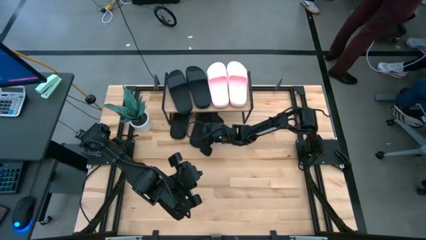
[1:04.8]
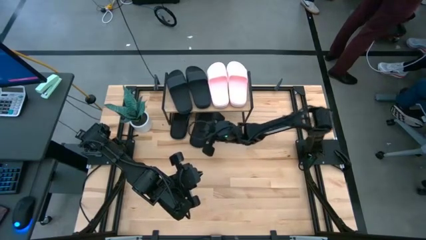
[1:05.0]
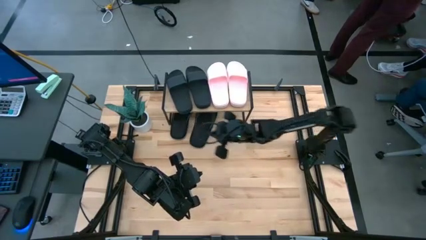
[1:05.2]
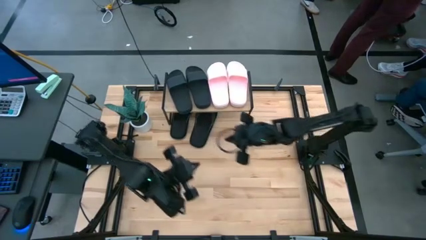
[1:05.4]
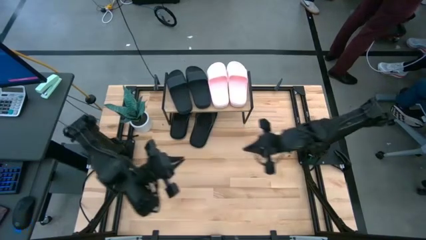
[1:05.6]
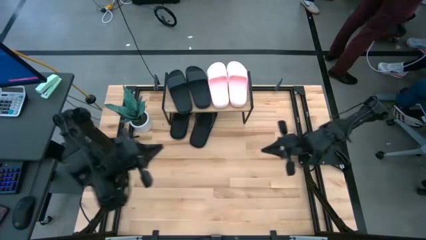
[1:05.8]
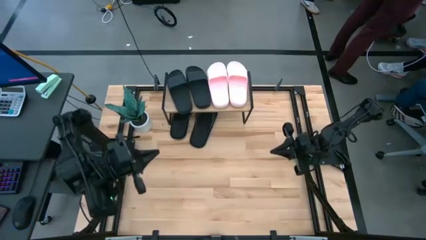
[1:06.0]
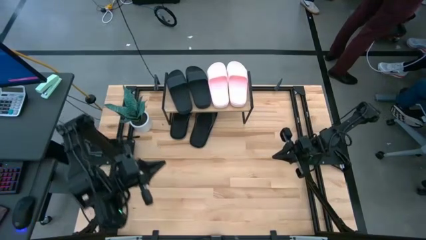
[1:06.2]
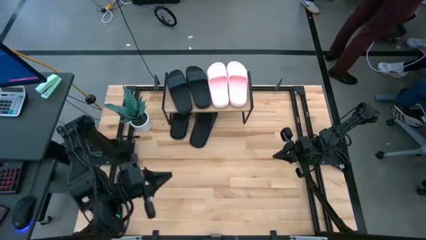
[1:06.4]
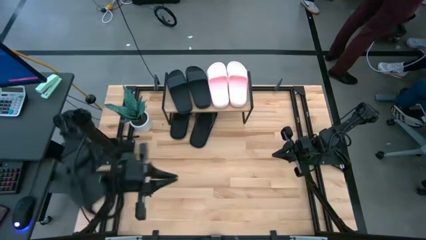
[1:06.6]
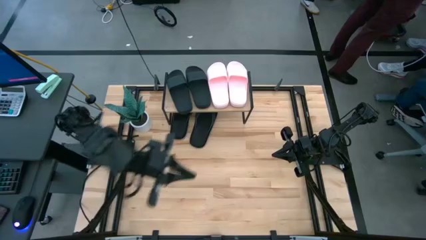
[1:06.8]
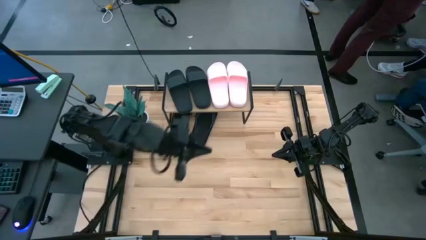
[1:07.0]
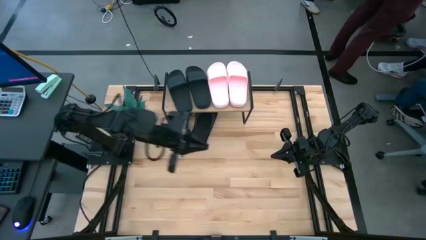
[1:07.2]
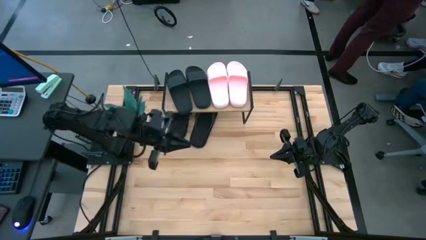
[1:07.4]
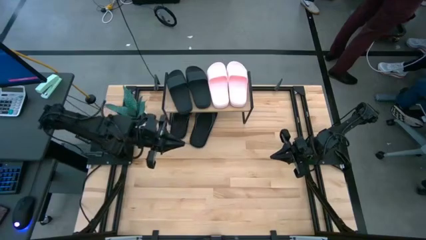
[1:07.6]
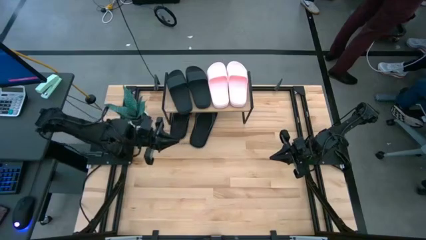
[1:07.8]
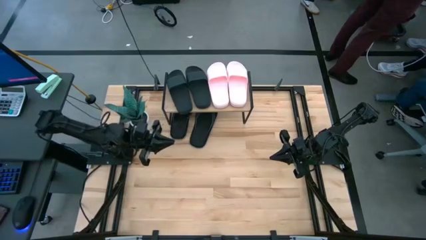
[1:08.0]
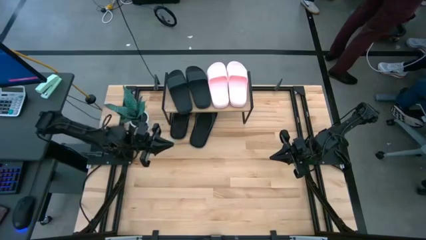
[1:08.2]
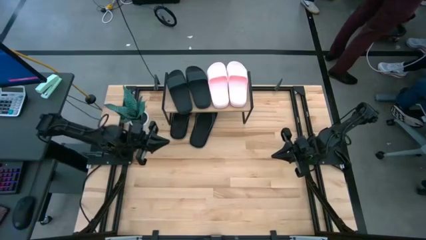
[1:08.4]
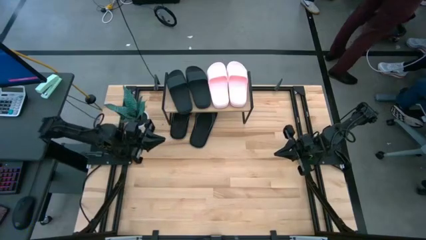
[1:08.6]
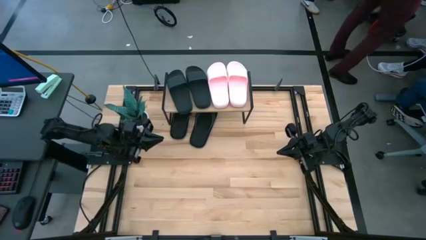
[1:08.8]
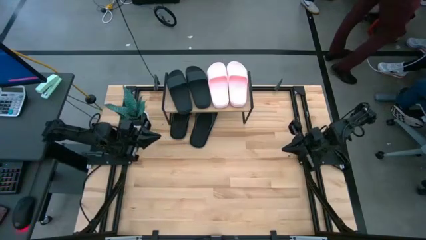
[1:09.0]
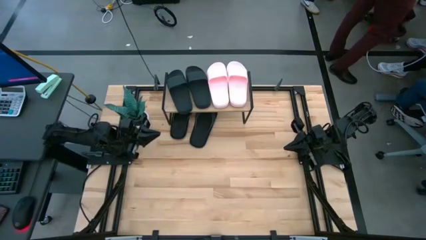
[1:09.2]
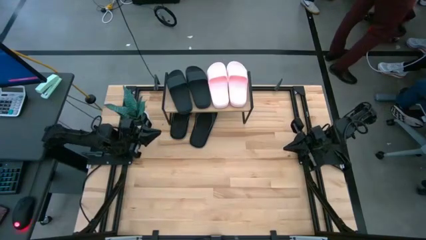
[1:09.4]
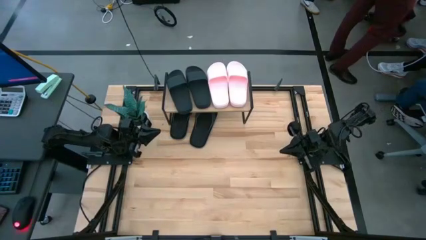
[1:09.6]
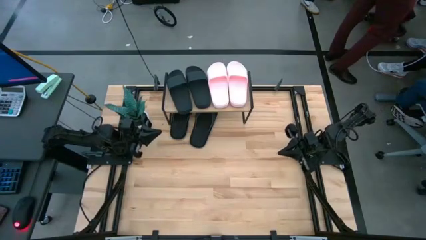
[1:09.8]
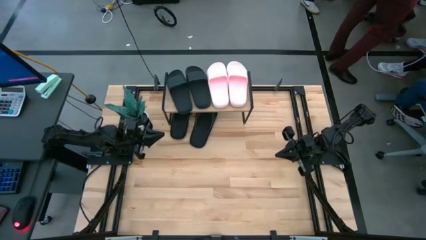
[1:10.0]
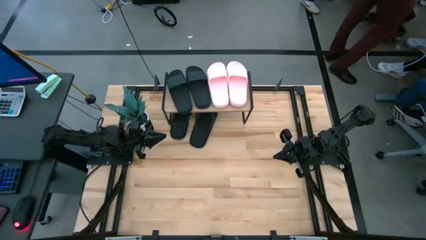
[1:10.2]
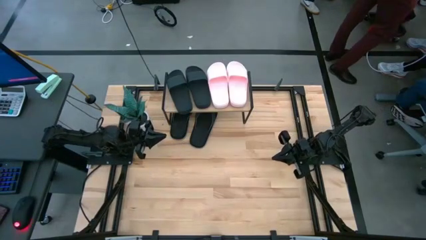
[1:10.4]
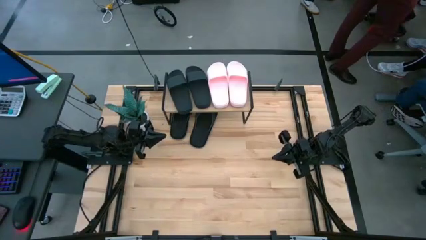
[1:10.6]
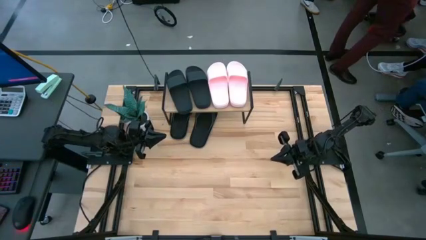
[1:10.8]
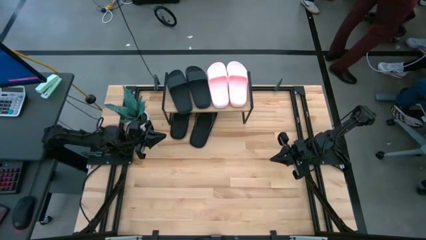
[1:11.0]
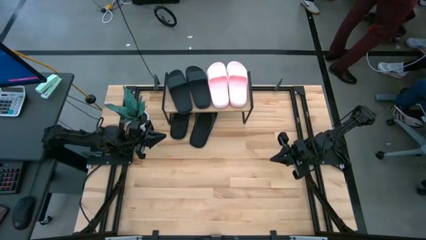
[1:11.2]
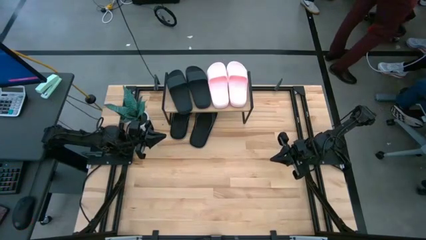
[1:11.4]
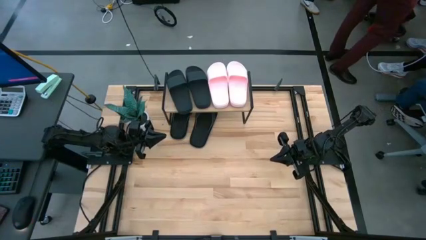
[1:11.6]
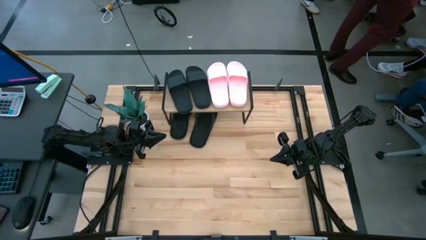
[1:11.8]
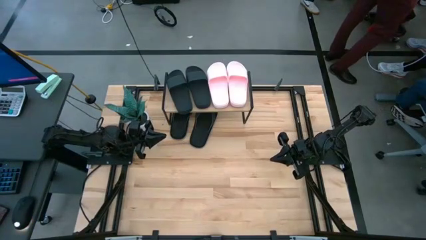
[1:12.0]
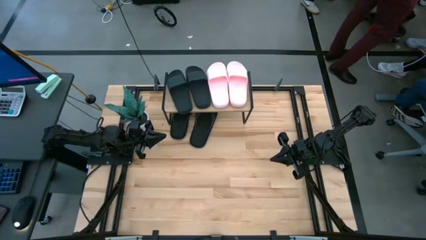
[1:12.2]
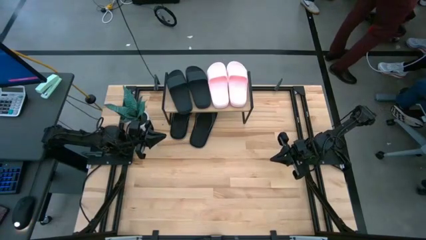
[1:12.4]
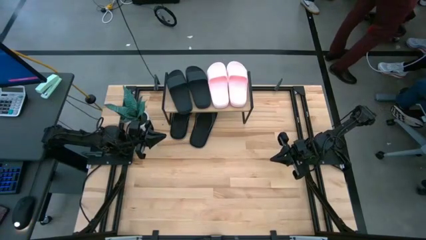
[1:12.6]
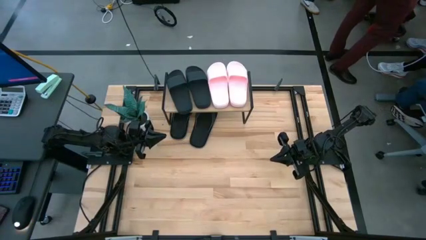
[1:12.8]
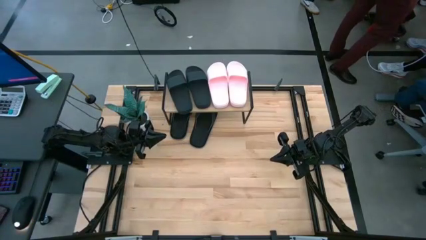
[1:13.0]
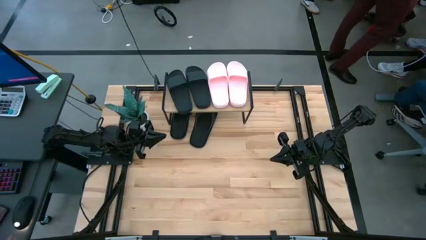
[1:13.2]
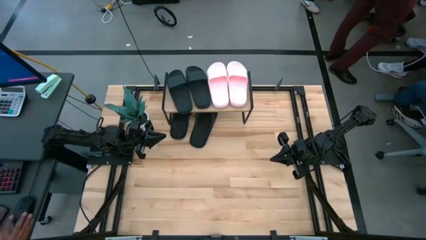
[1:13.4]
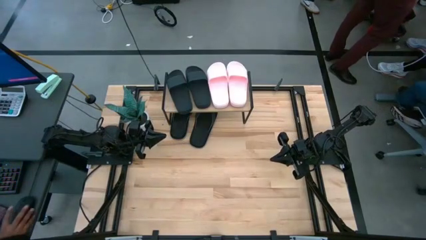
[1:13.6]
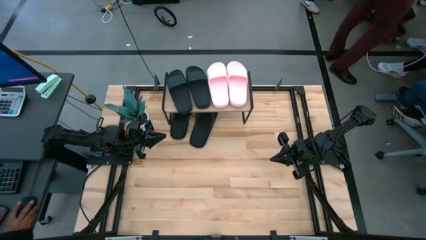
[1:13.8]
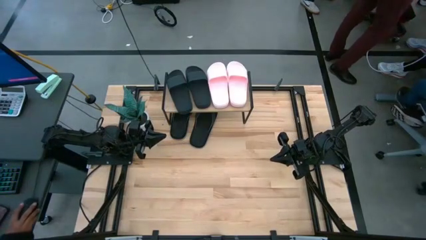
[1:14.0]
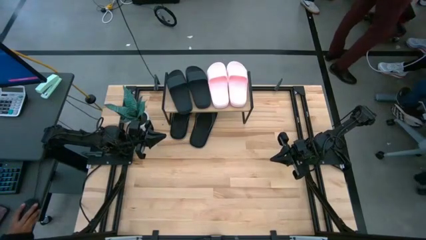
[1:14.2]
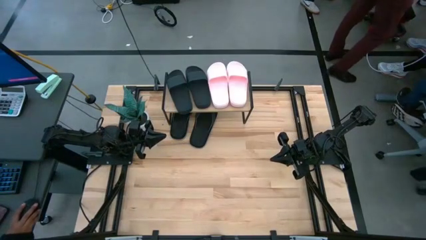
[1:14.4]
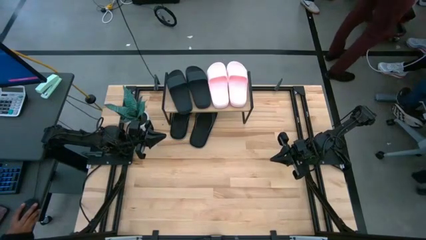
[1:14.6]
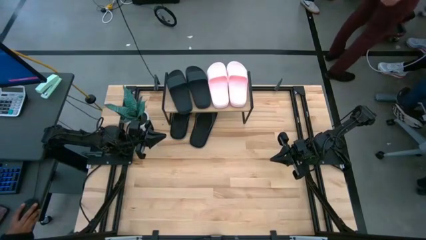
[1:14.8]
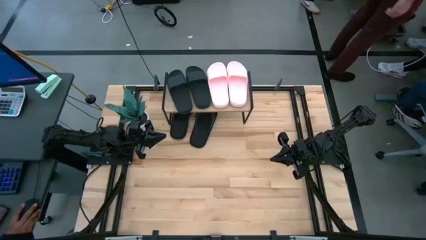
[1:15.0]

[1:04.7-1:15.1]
Task: Pick and place slides into the shelf
Return to Home Position

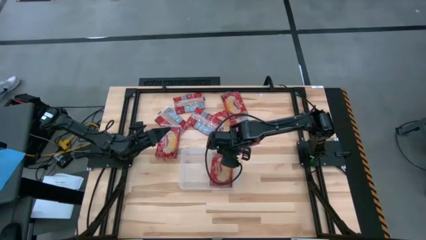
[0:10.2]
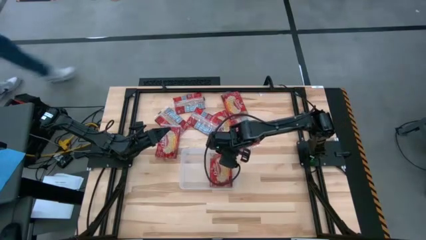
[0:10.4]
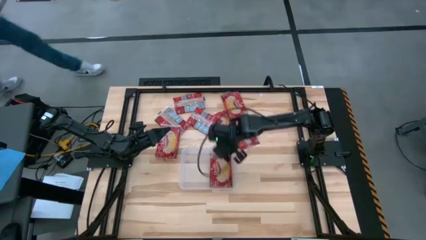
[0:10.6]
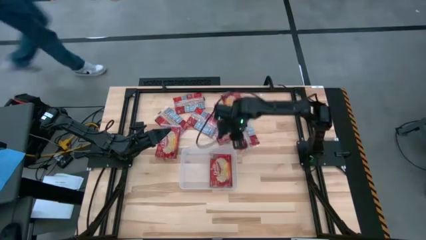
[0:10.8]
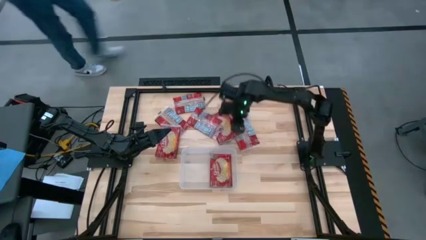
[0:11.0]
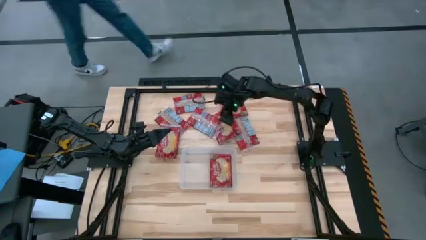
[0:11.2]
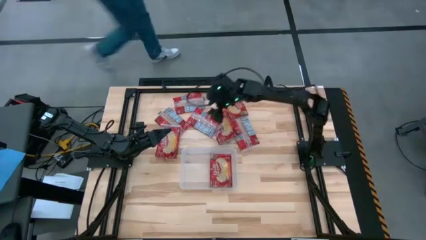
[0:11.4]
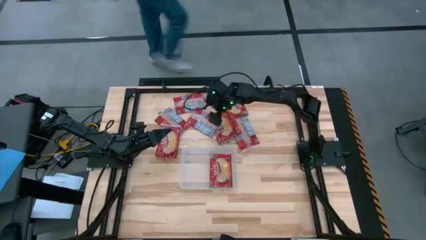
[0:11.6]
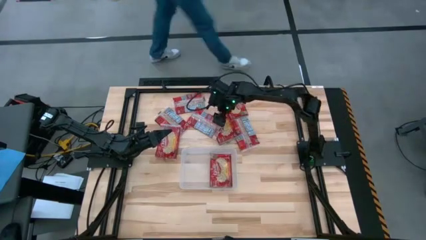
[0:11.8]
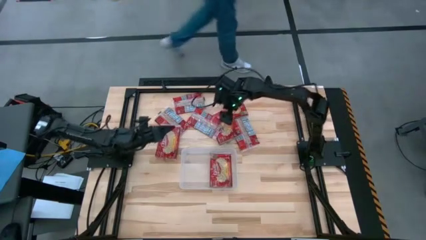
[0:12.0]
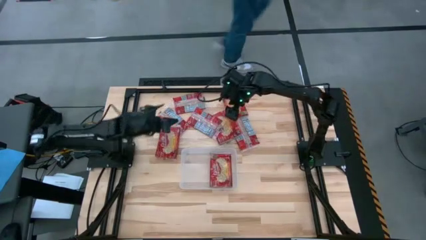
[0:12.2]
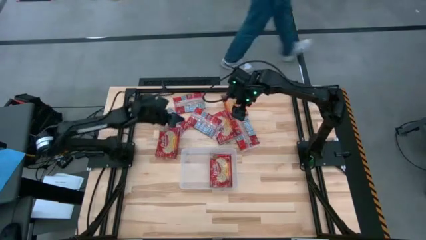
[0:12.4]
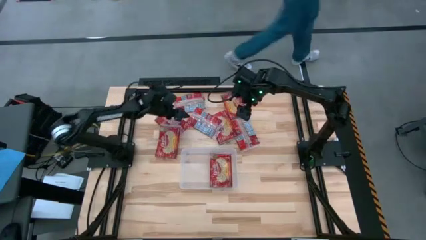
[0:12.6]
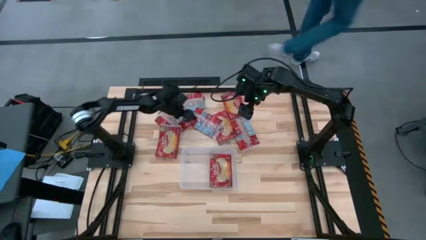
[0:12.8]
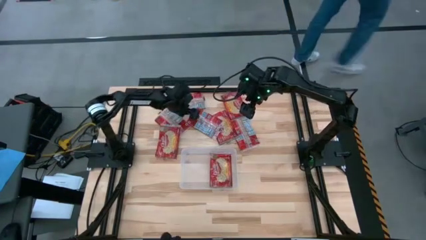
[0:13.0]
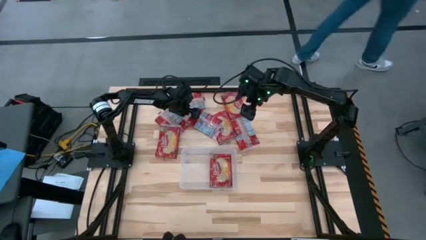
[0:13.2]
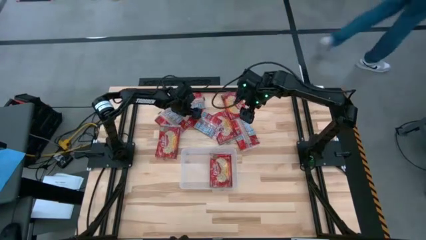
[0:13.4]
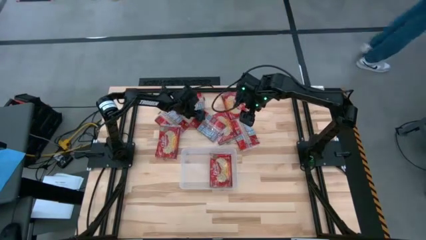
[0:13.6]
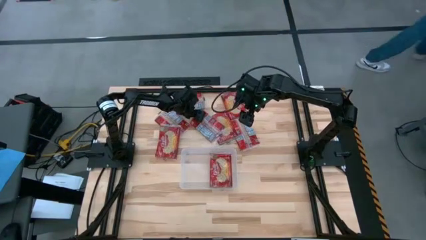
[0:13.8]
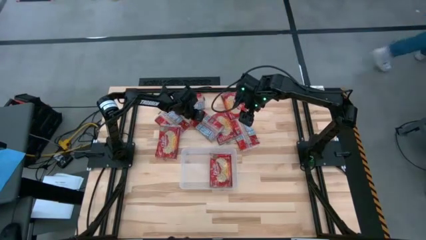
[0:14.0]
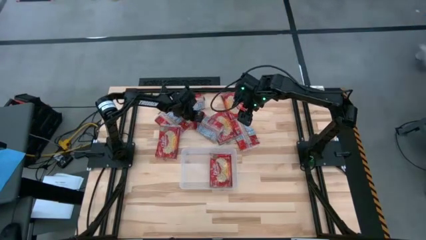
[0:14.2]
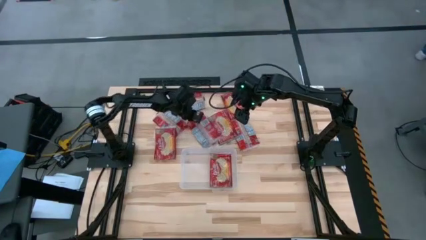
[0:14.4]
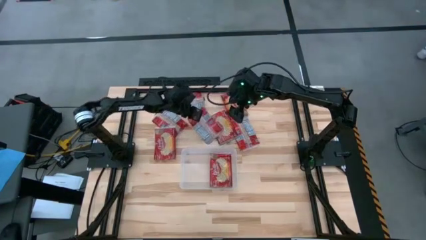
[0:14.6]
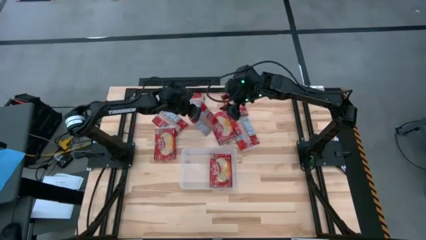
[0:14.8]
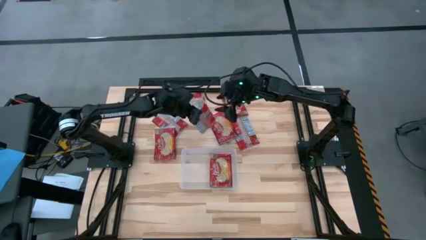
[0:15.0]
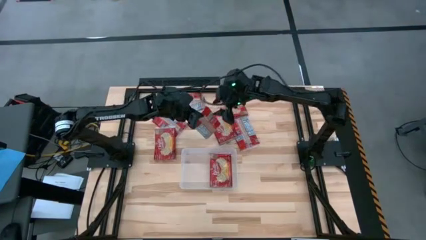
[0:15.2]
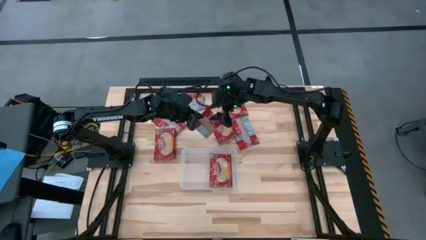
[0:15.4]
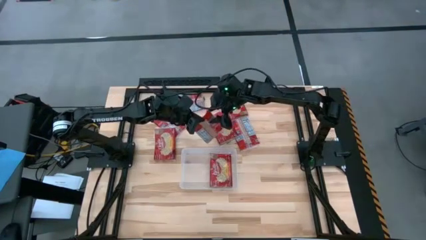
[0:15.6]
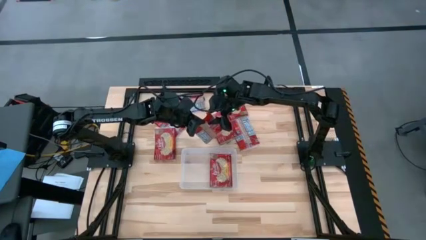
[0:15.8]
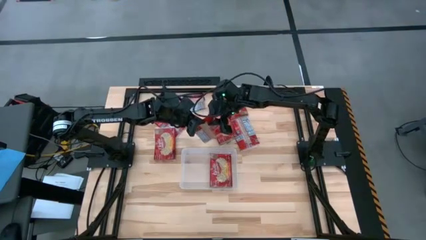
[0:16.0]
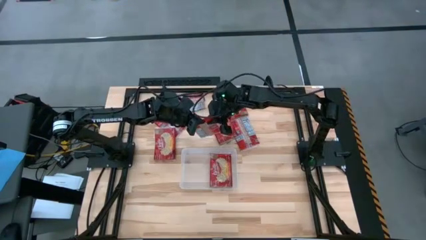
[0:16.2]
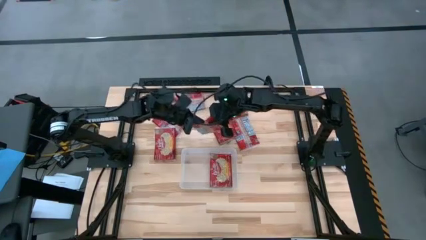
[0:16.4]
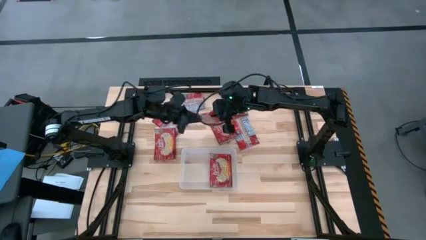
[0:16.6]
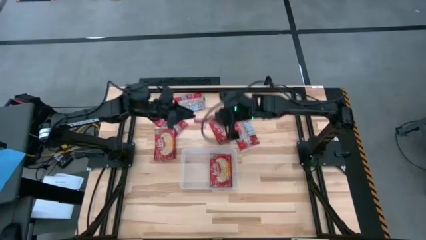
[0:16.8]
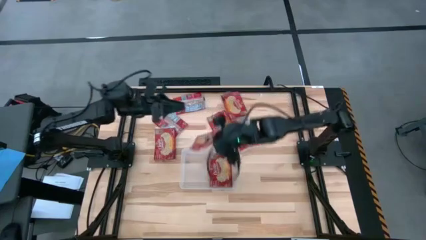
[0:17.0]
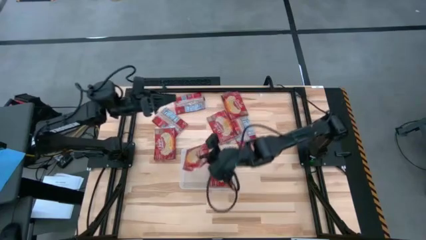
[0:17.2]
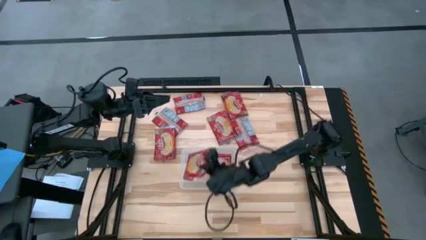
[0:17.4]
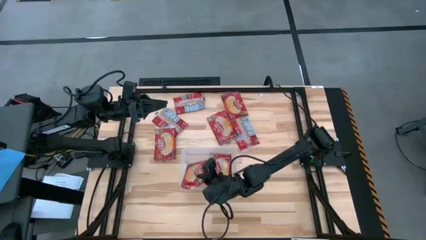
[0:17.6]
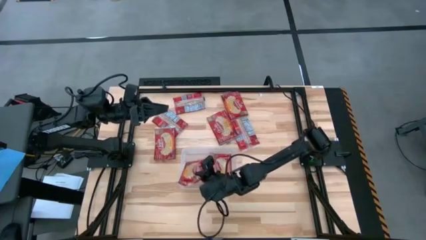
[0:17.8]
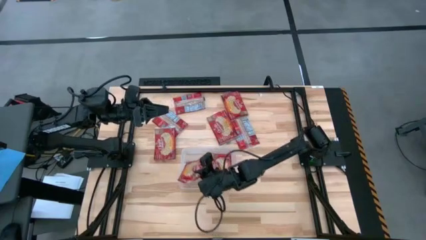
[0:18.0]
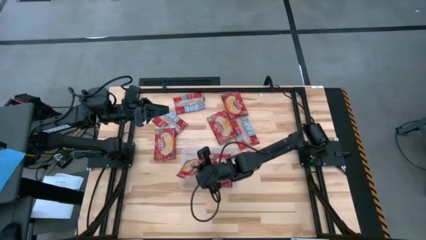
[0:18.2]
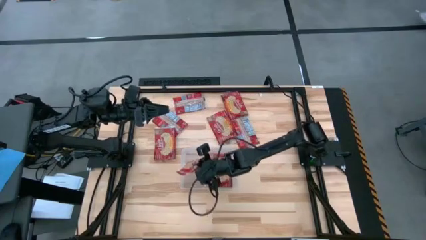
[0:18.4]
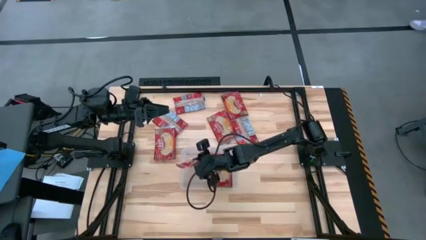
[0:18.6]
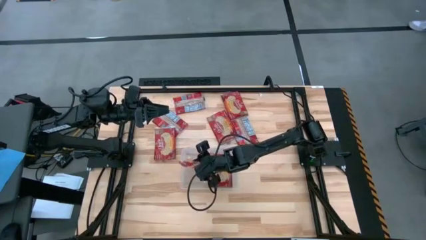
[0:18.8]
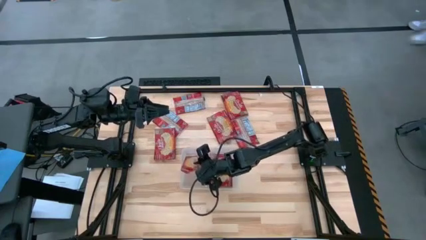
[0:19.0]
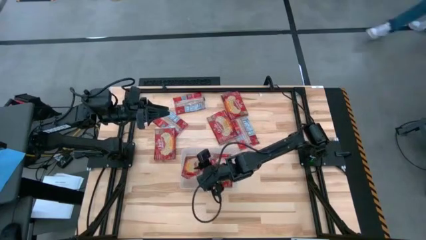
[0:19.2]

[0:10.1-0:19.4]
Task: Sort popcorn bags into baskets
Put the red popcorn bag into the transparent bin
